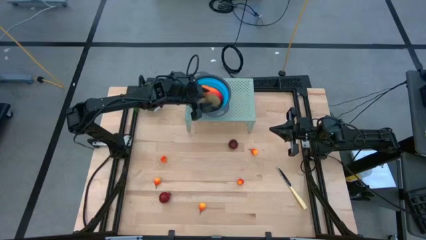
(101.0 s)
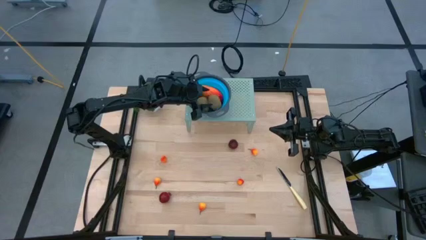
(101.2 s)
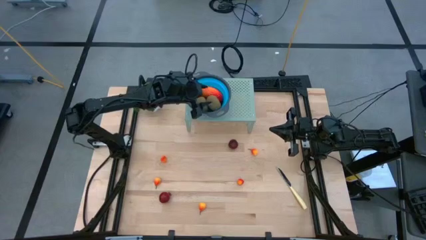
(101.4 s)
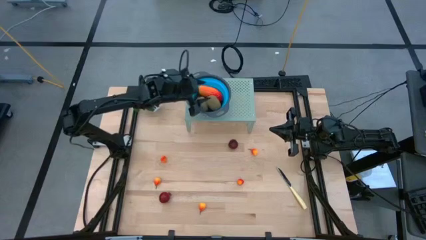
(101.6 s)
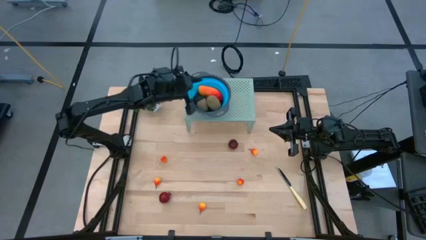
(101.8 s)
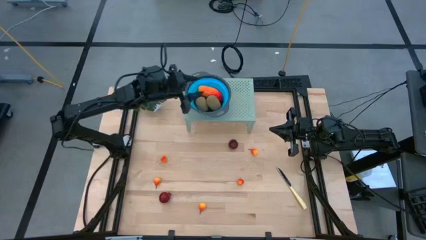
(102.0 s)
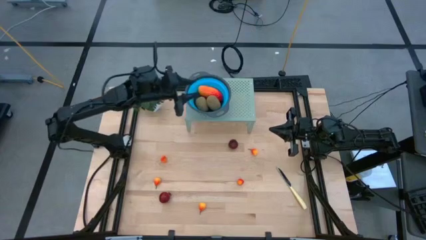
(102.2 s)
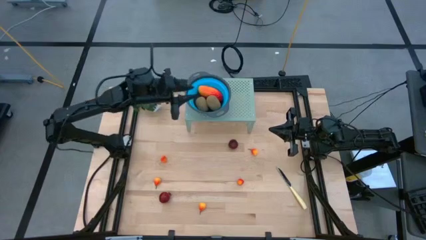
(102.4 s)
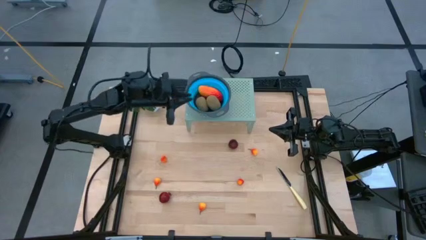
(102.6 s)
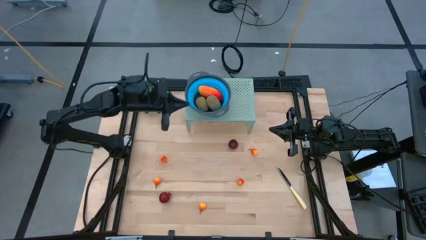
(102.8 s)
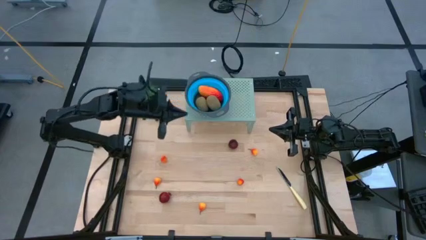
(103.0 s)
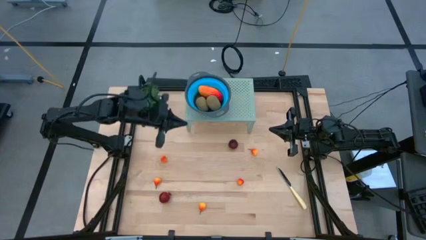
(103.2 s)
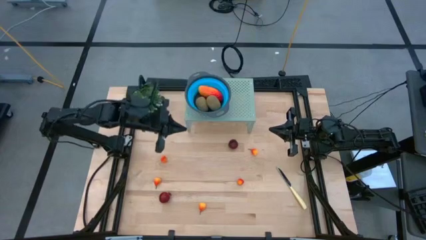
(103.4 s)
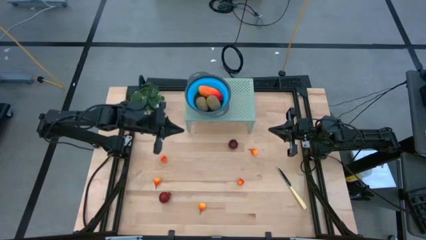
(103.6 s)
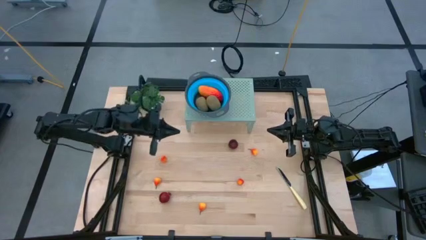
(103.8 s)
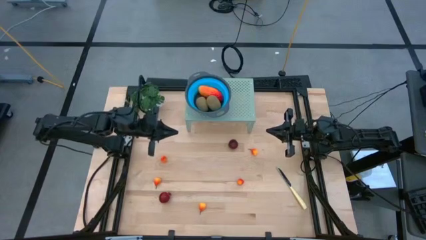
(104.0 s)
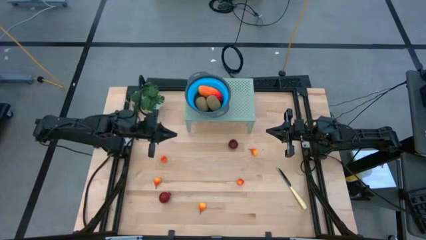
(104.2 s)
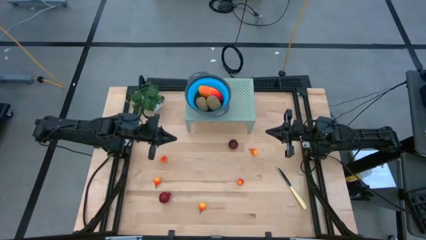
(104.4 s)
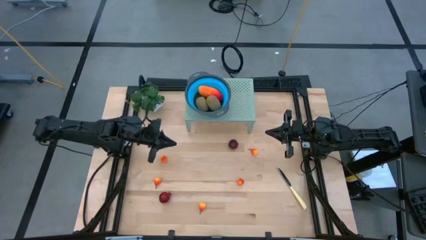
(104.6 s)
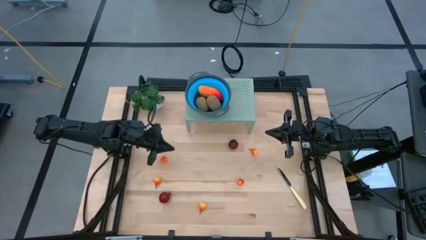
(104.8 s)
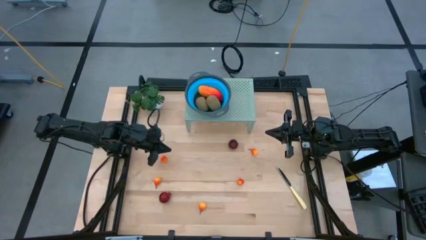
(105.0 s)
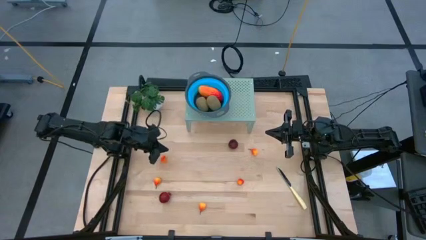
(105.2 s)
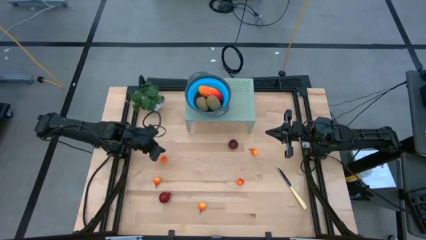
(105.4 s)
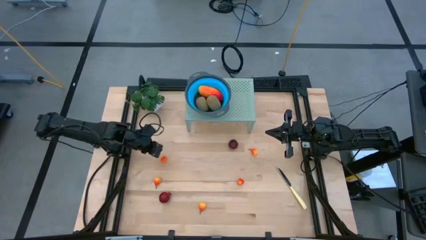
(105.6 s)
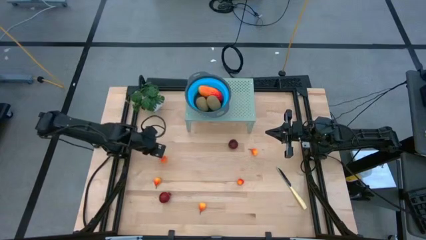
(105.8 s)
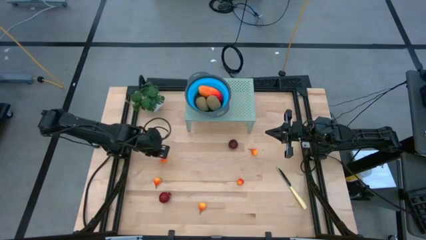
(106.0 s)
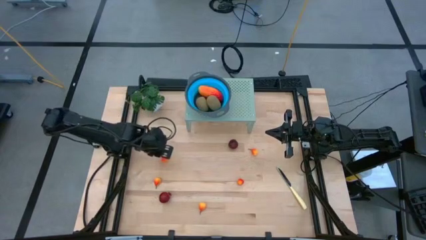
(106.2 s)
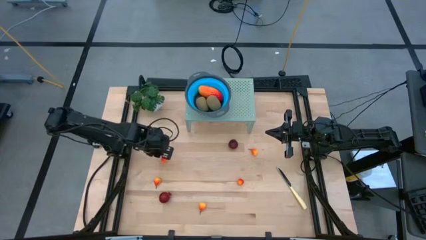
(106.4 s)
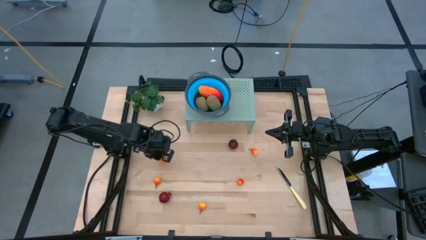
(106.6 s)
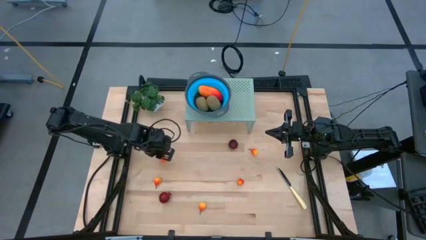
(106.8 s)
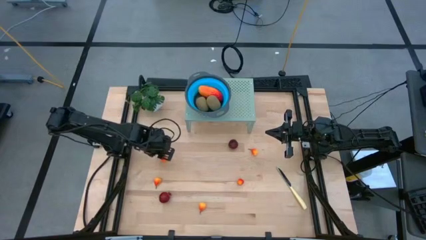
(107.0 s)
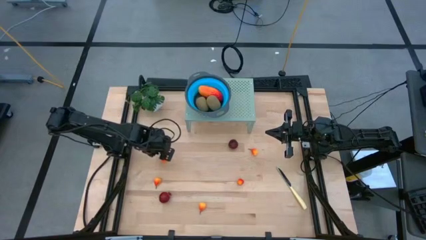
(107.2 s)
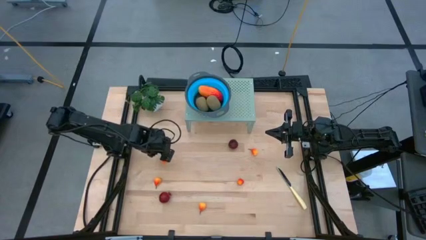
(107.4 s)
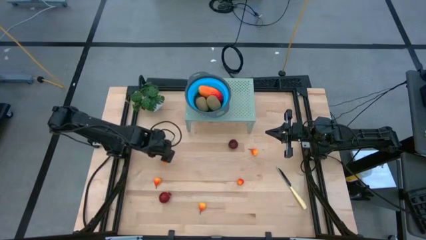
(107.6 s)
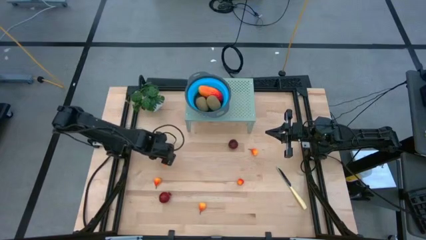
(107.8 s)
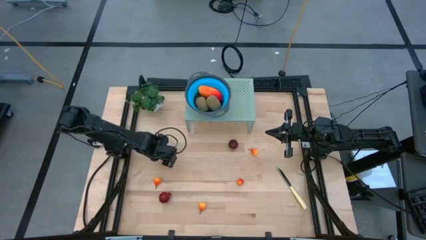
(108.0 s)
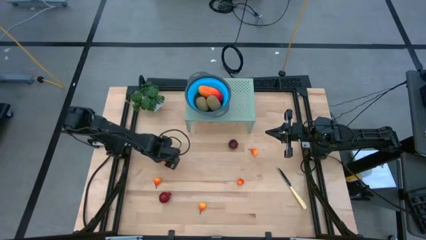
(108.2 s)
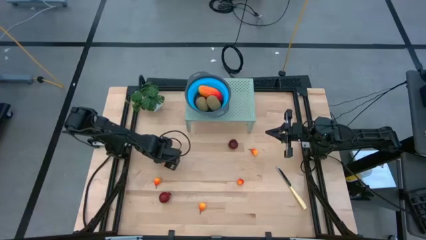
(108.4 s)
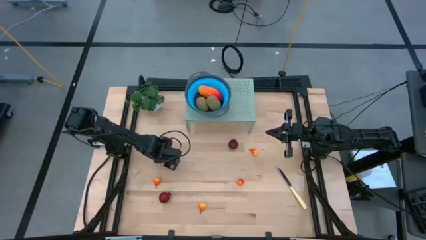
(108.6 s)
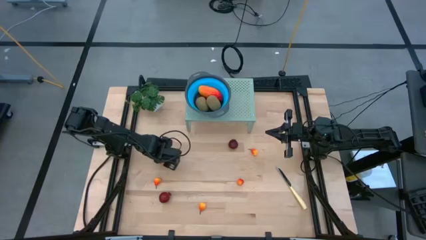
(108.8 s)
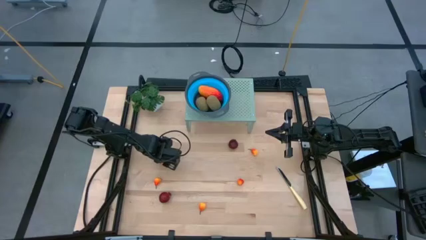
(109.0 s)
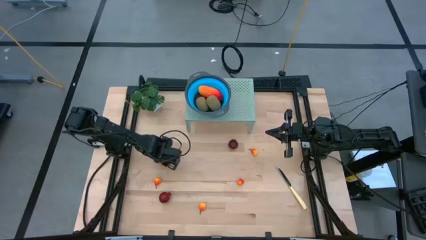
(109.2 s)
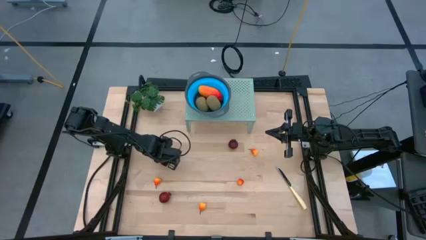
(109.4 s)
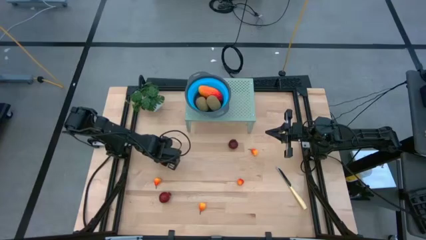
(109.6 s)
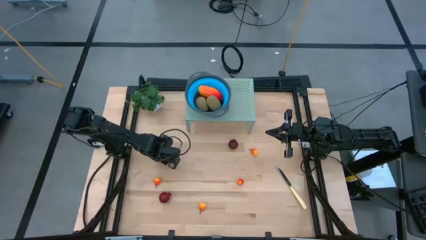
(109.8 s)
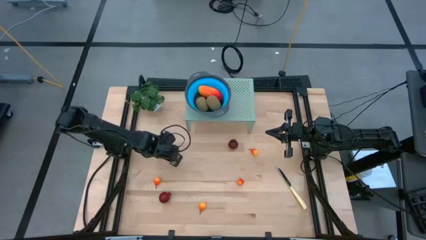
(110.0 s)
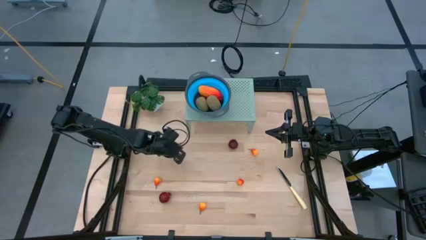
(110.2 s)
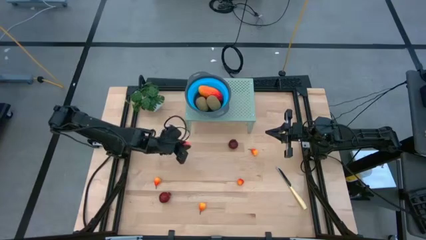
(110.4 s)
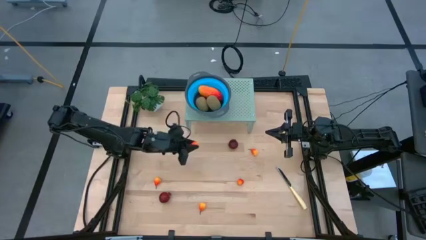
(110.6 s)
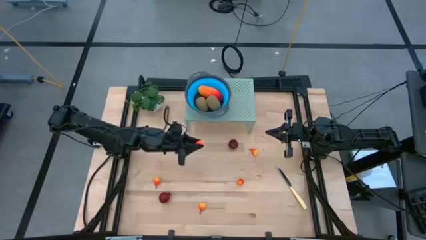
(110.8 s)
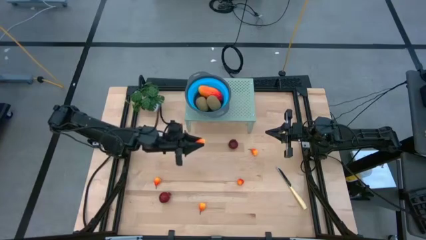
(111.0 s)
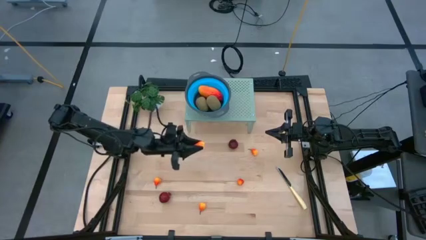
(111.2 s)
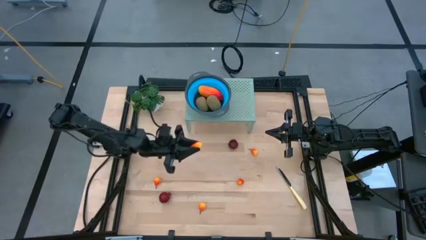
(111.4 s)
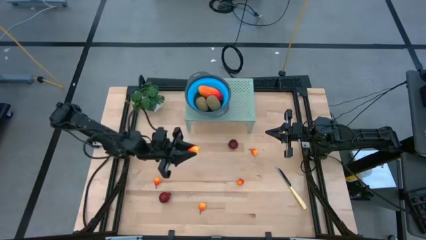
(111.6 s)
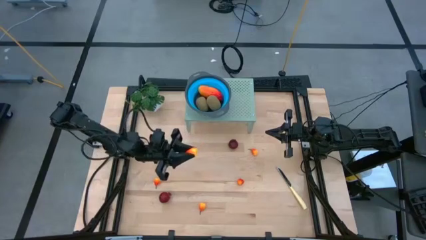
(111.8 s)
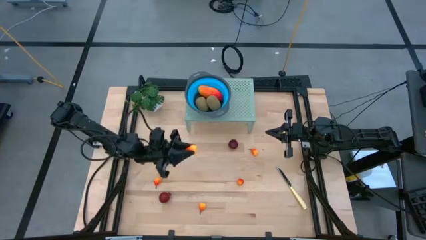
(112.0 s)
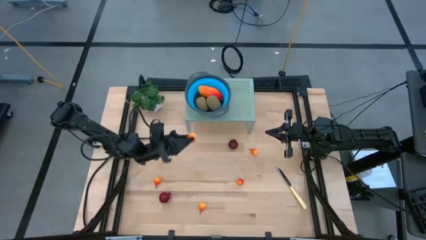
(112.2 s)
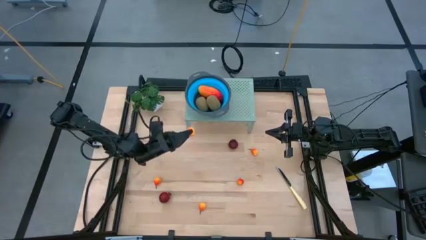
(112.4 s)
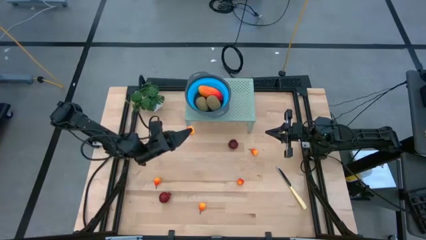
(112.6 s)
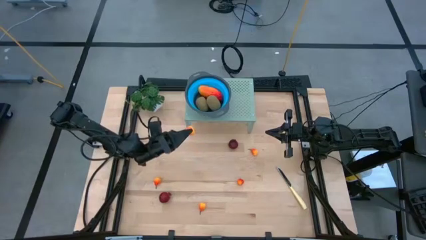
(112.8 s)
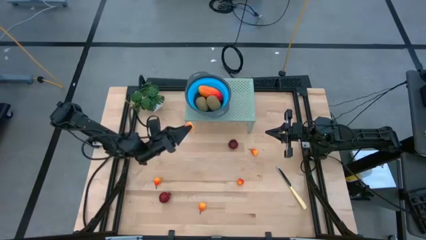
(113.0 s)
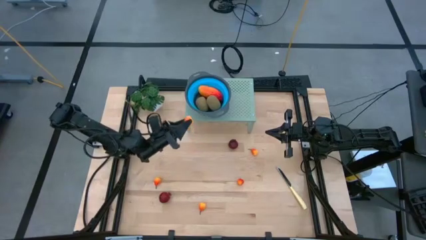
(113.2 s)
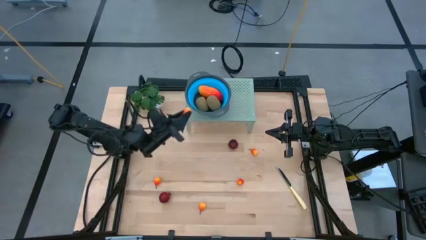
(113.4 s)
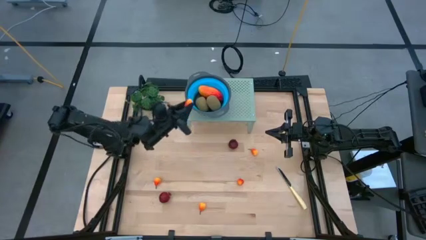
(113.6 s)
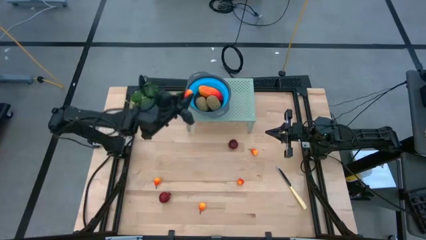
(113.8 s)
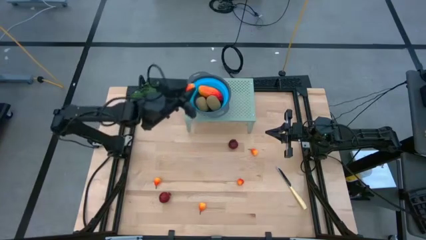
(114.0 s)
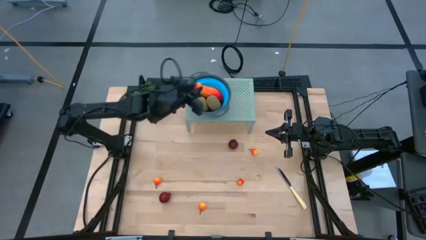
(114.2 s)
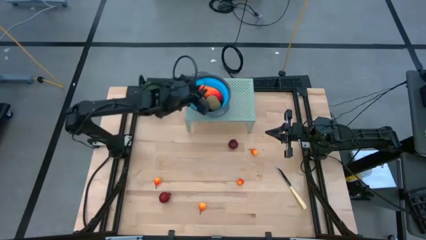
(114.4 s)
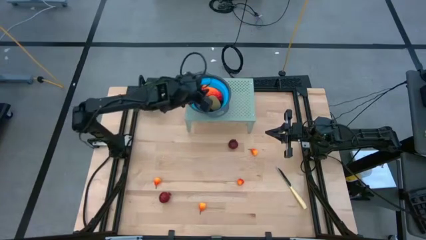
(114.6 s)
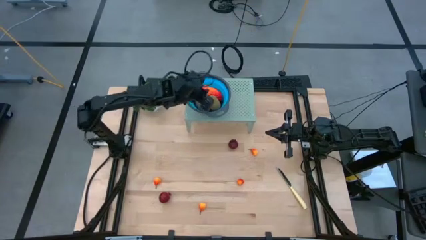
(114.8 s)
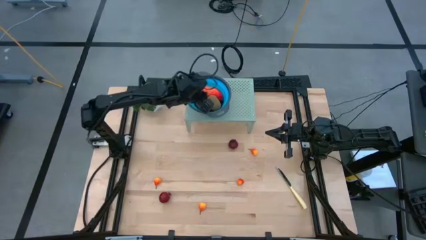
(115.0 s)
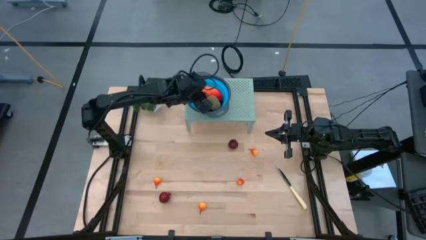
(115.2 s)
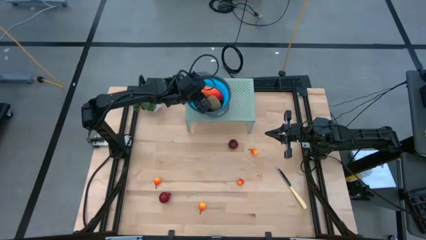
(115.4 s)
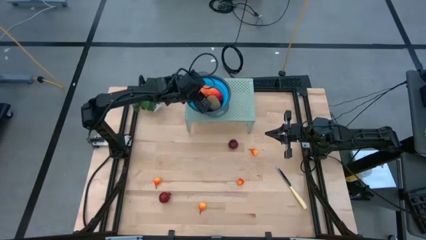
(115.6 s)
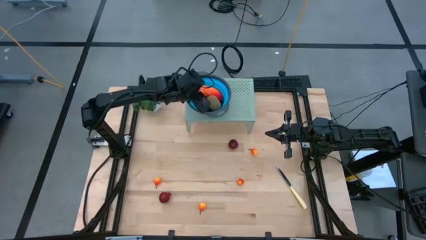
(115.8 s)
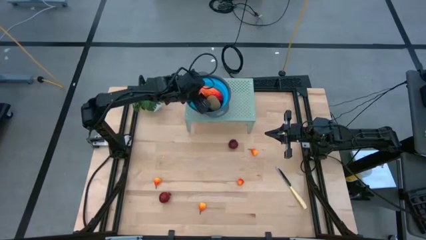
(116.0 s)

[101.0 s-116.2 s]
Task: Pick & Place Fruit
Put the orange pear into the blue bowl on the shelf

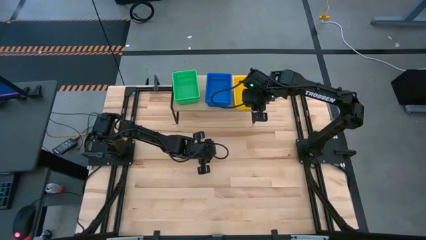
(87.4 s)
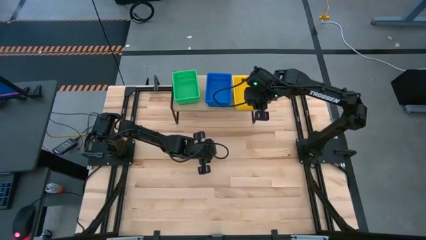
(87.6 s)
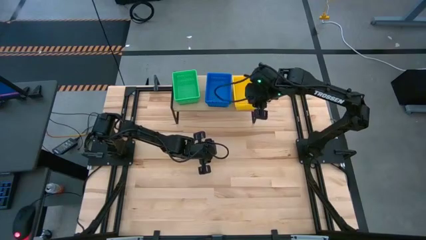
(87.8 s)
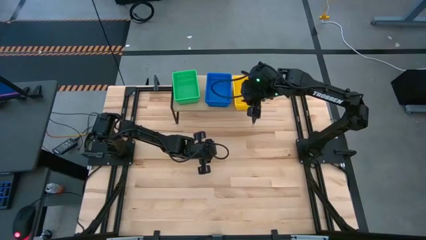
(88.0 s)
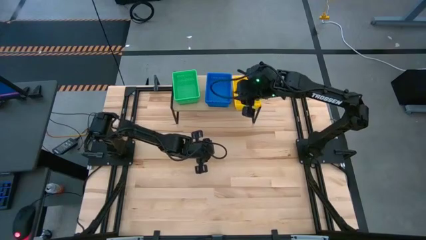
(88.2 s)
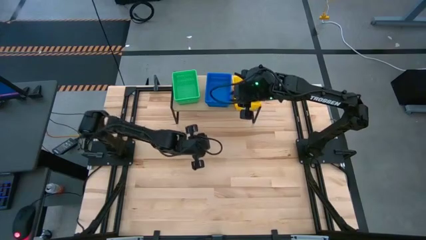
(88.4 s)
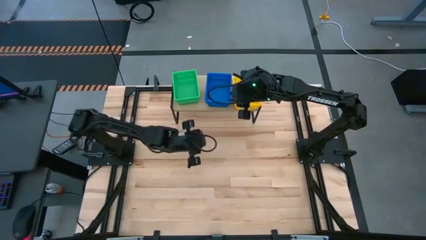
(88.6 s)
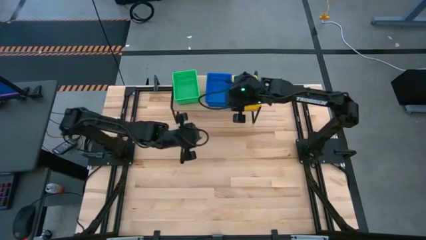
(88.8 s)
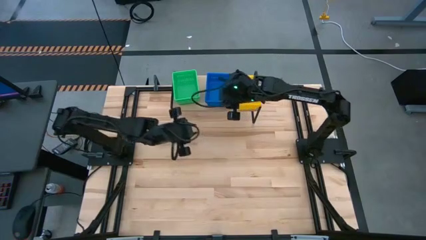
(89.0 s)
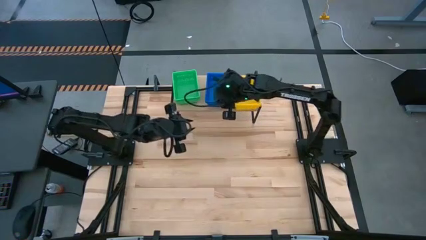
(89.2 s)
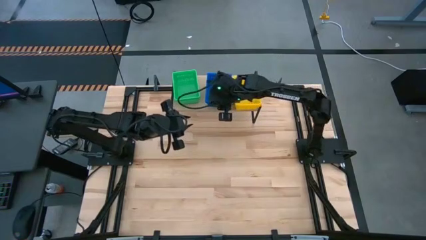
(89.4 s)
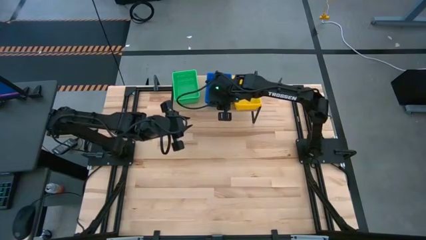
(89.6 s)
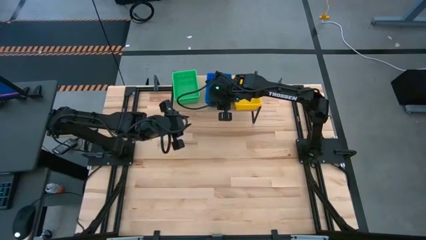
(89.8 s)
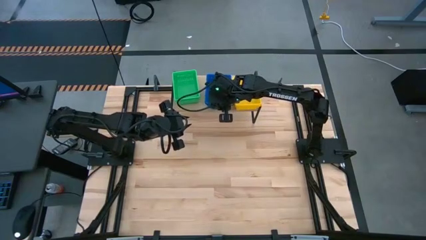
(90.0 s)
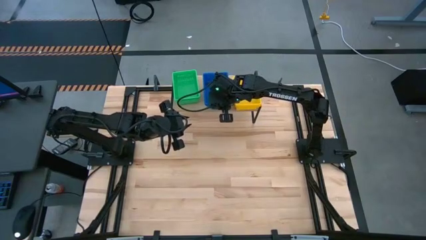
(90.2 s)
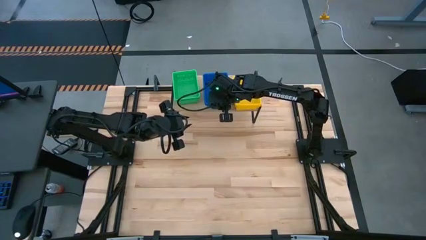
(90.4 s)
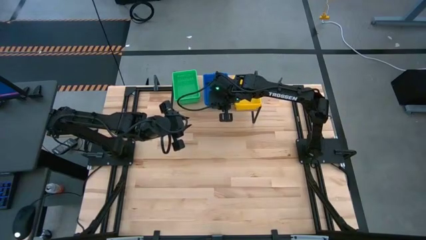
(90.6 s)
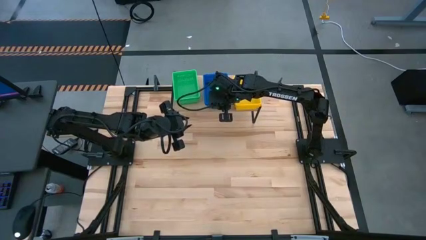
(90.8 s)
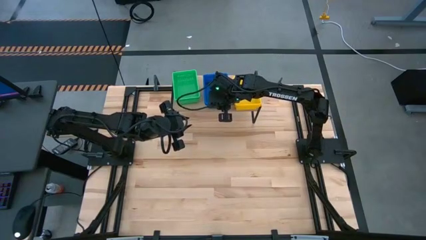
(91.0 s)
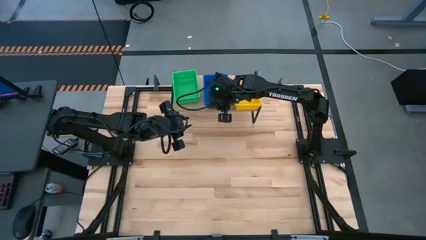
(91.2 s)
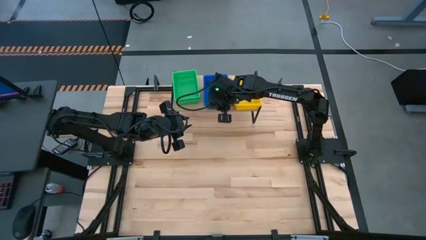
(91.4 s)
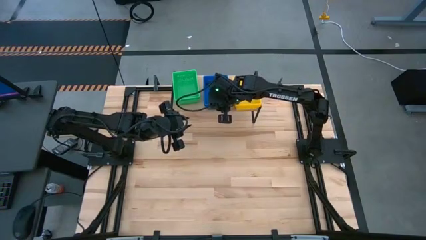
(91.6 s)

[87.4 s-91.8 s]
Task: Stack baskets on shelf by color
Adjust the blue bins on the shelf
